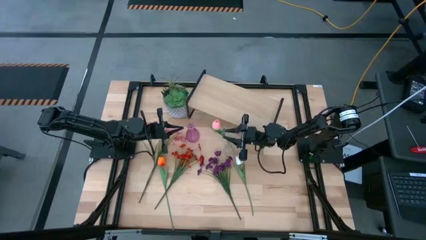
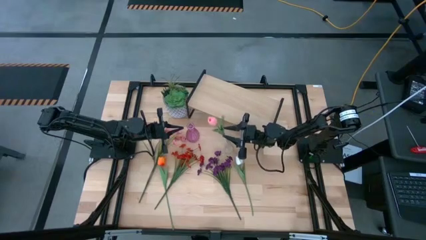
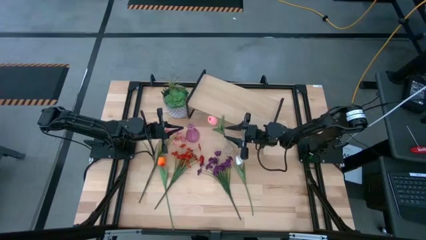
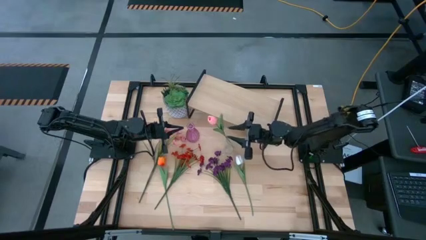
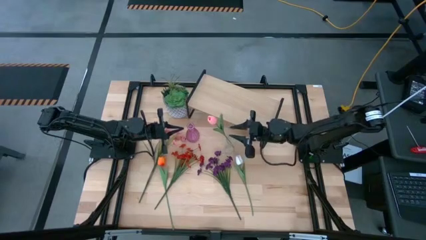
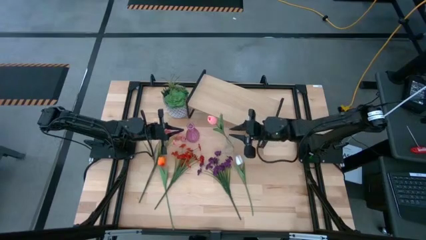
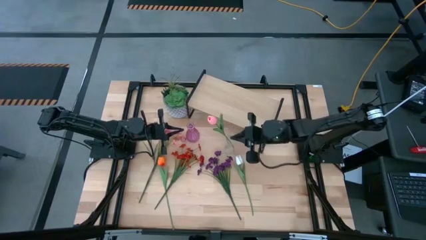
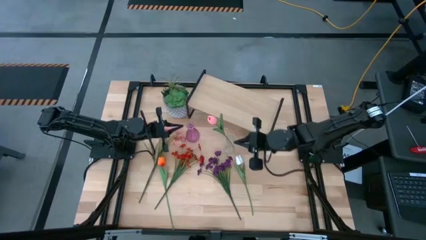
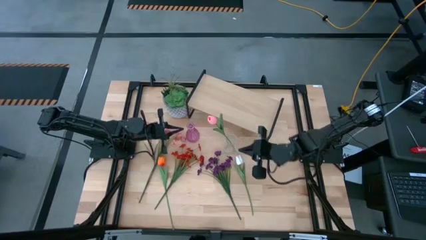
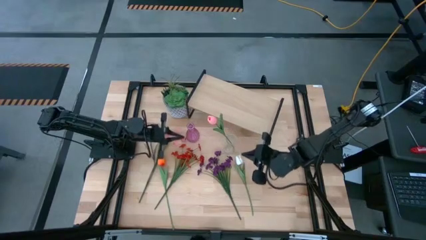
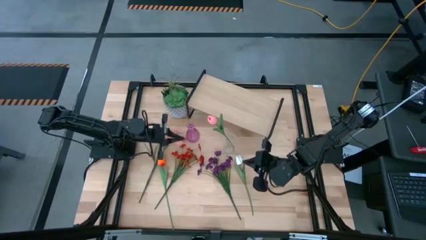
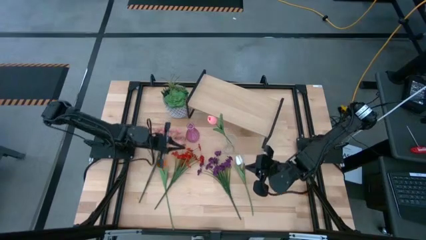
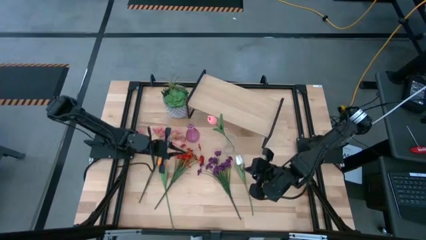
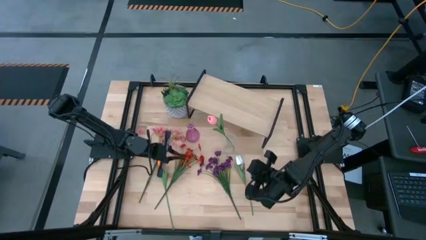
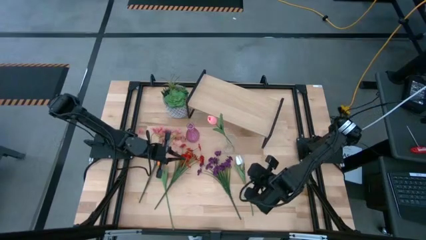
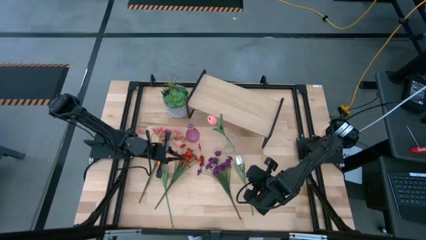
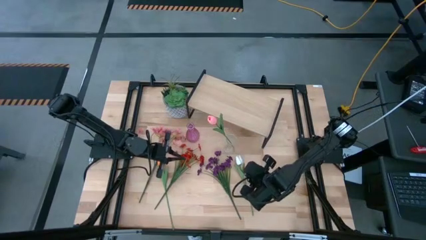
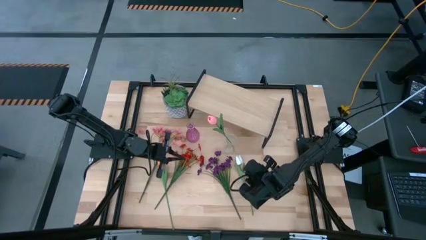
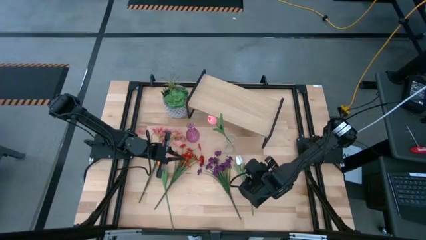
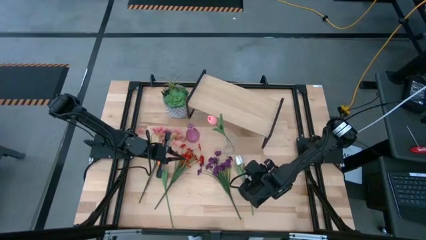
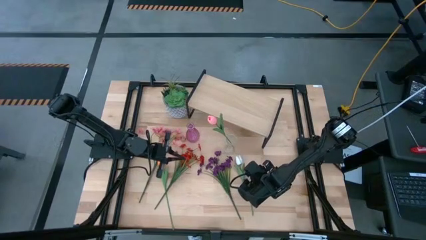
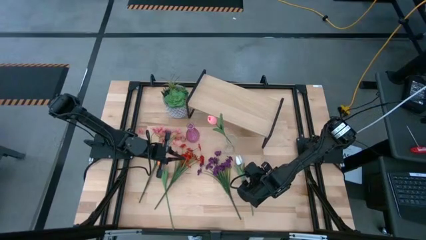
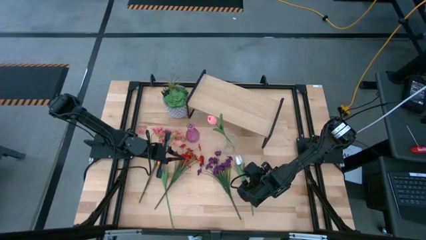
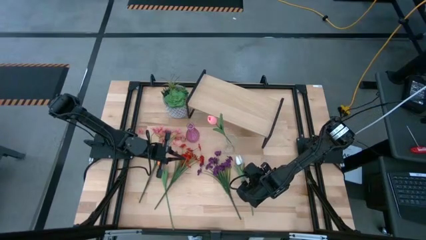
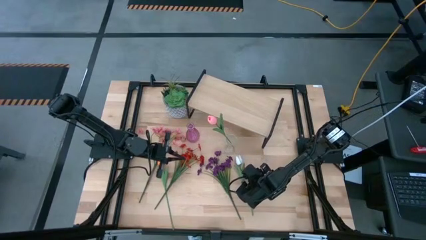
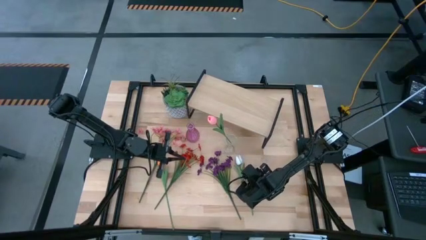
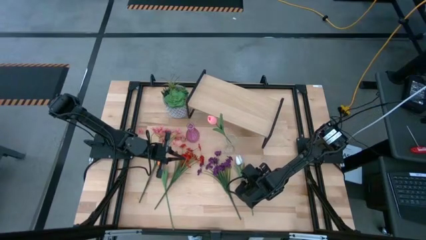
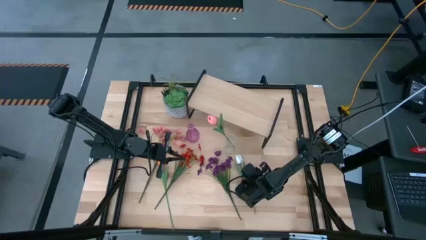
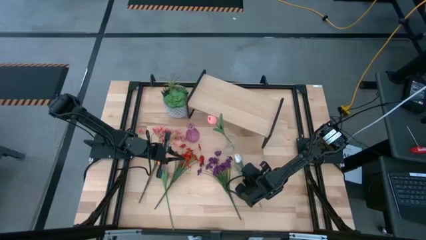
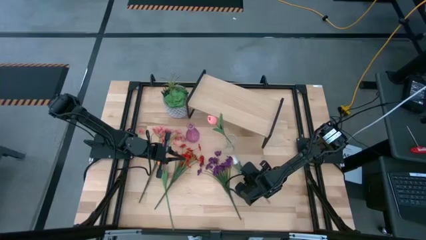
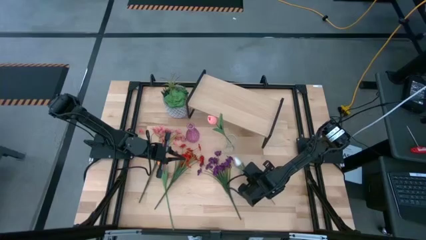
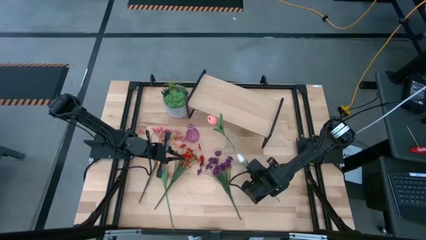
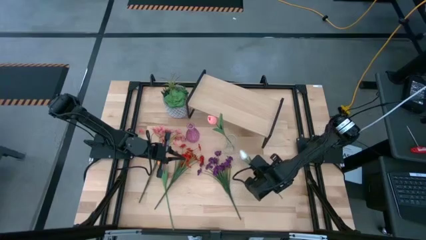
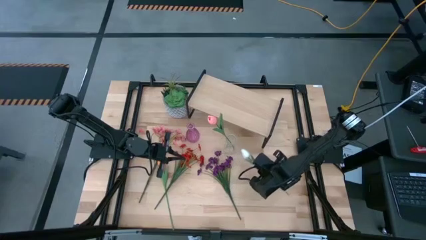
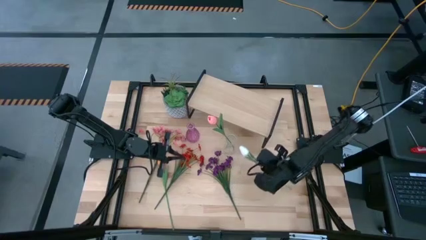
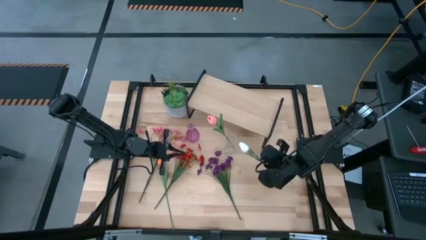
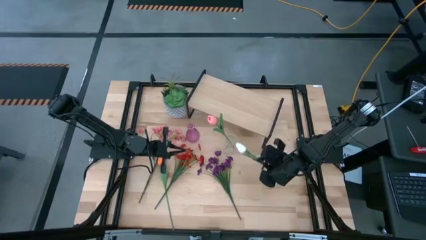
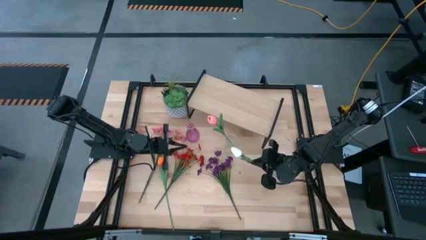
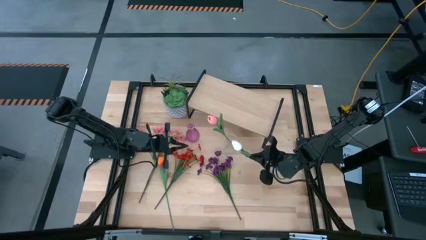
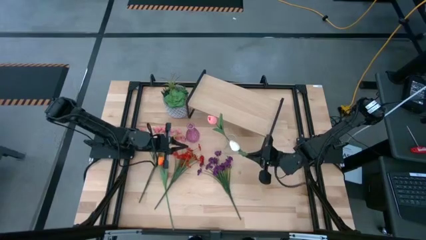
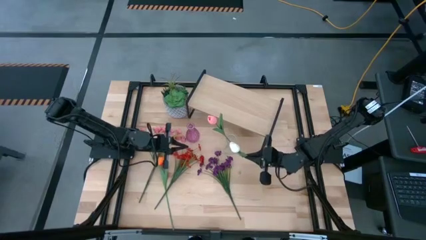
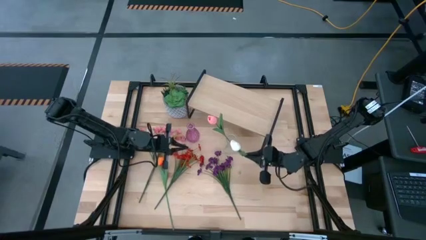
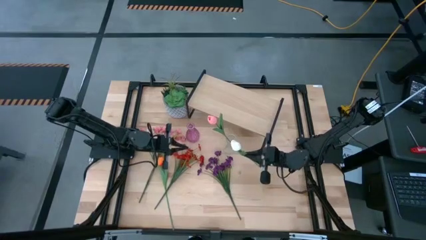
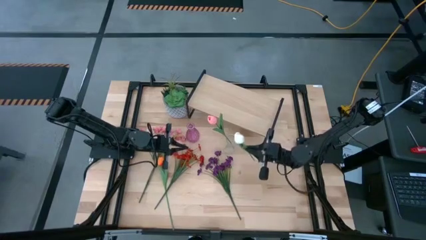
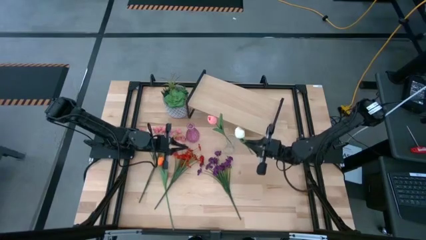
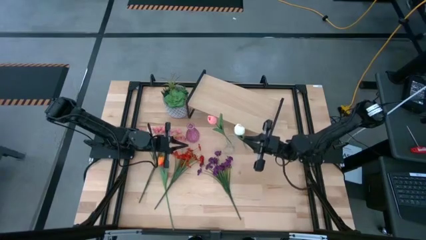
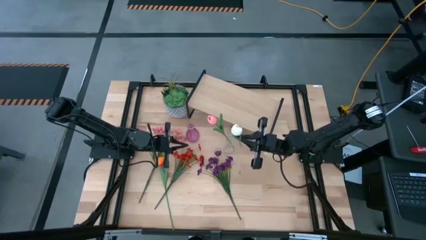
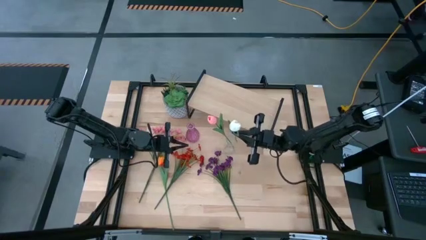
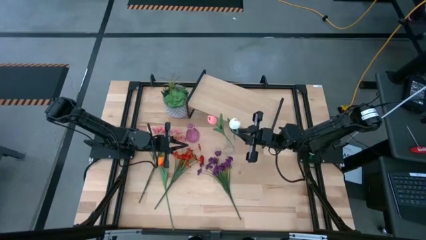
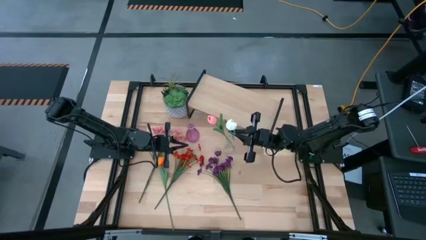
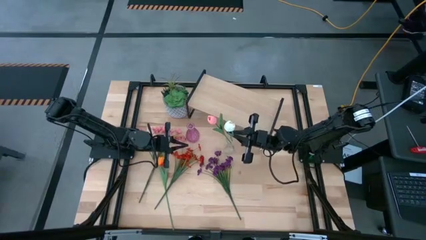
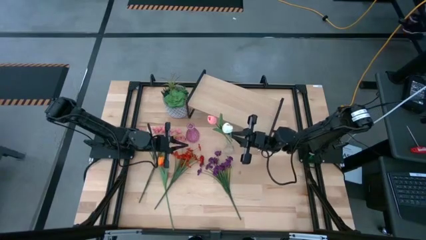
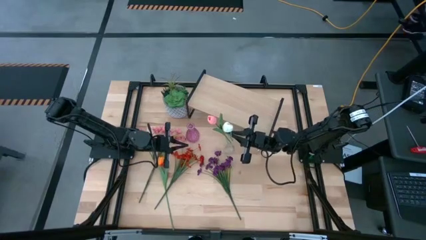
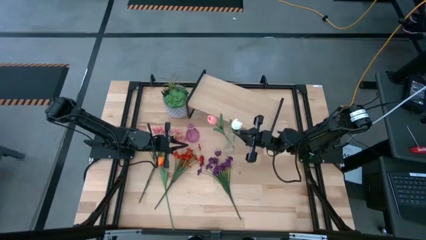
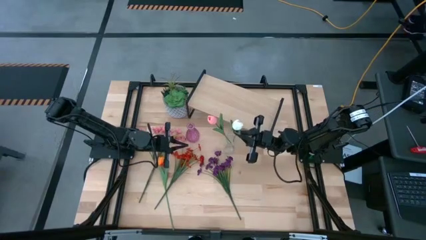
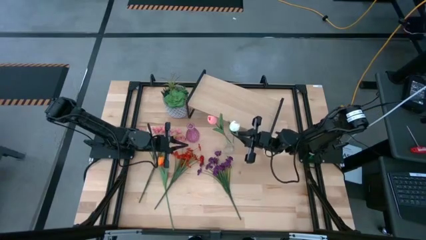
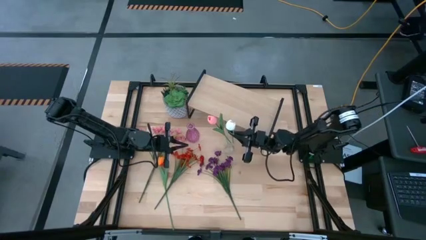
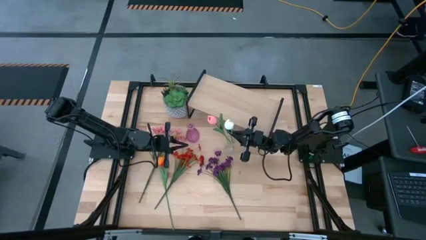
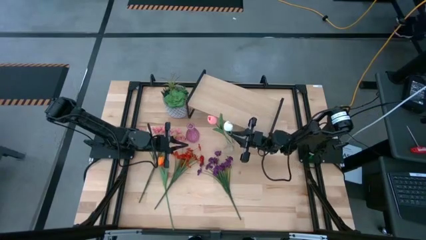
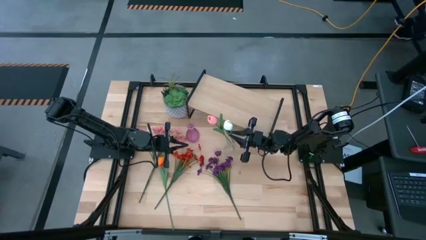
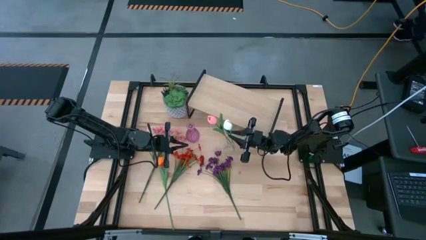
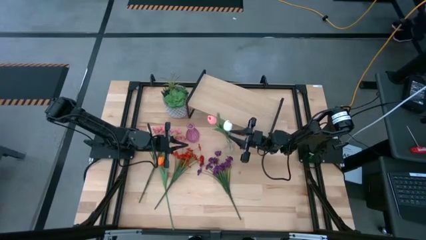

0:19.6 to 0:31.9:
Task: Pick and place flowers into a vace then onto a shelf
Put the white flower into the transparent vase

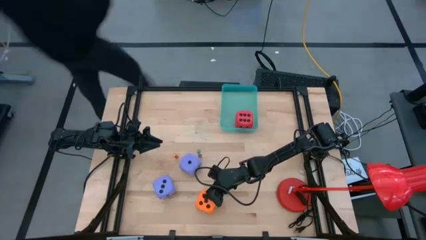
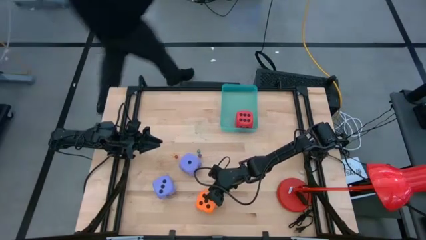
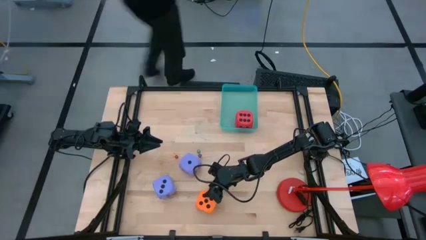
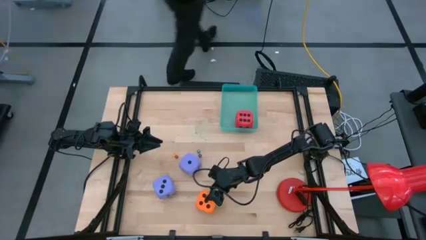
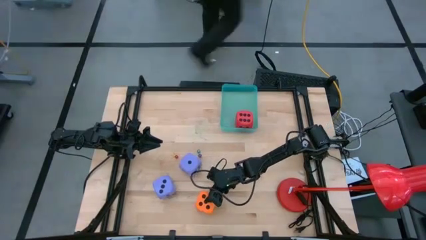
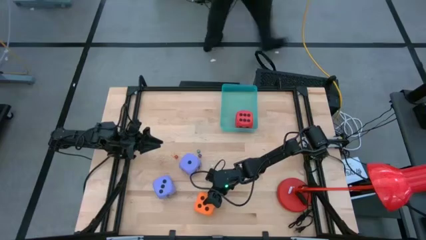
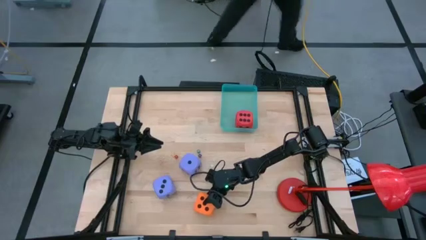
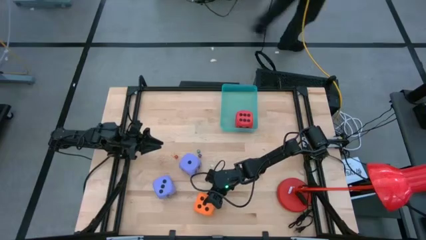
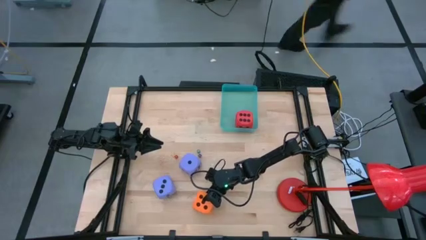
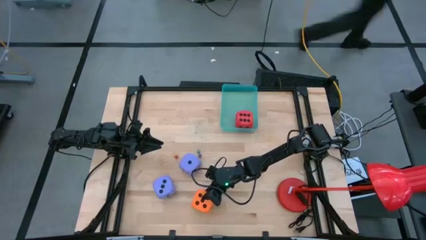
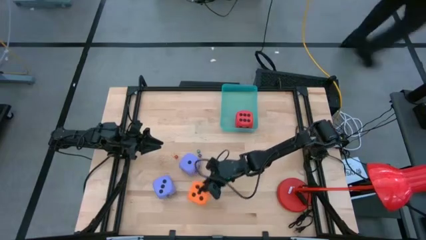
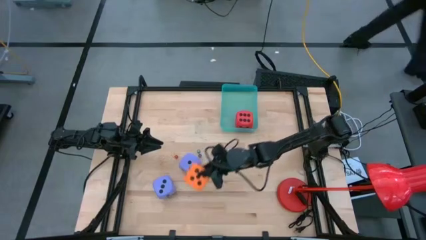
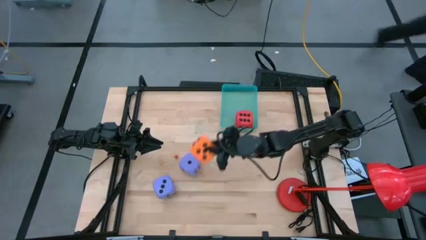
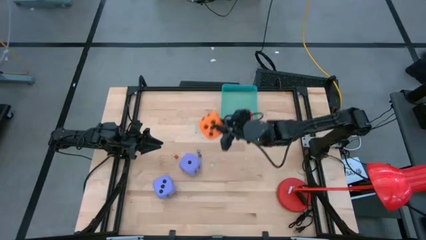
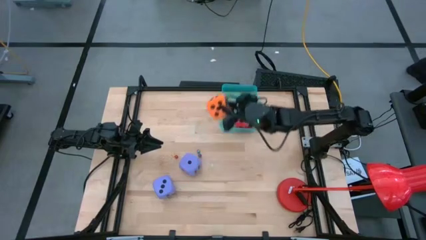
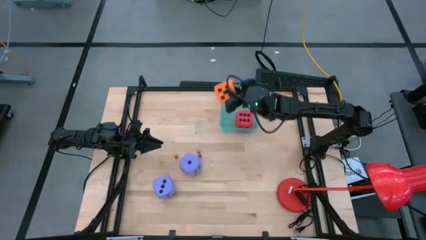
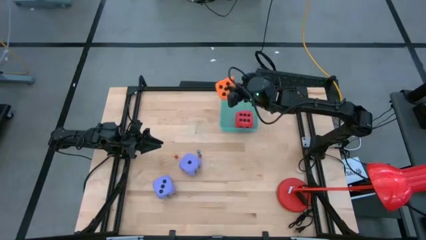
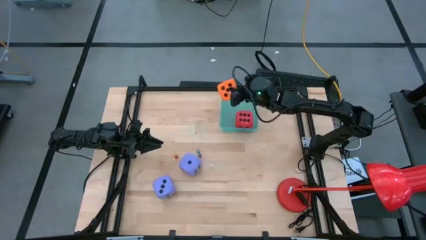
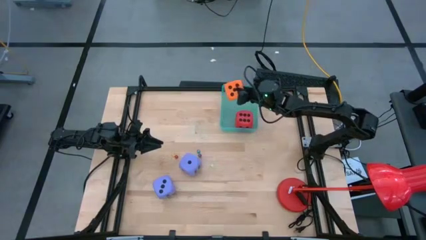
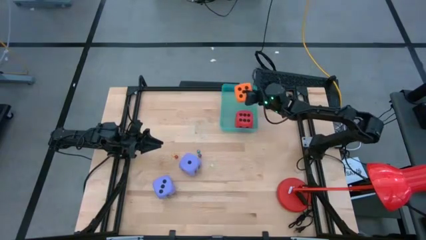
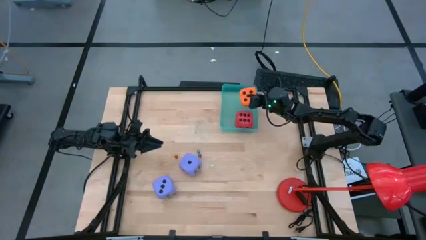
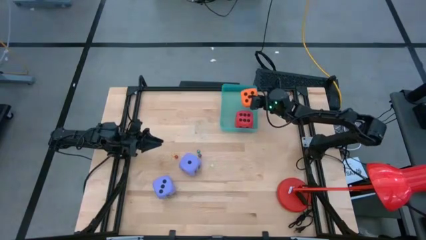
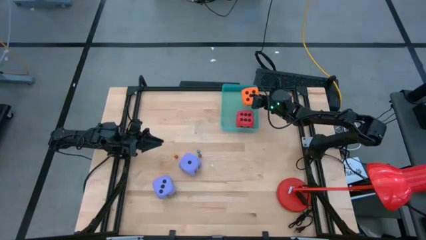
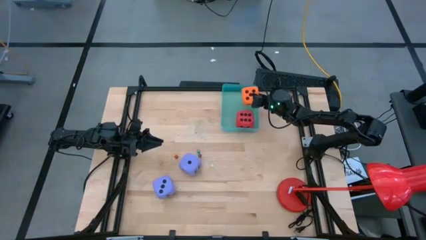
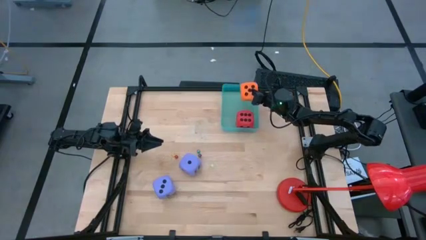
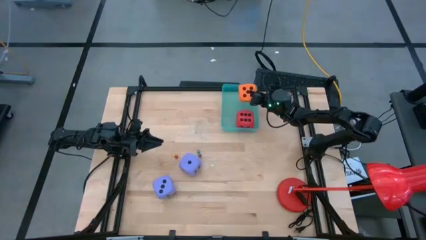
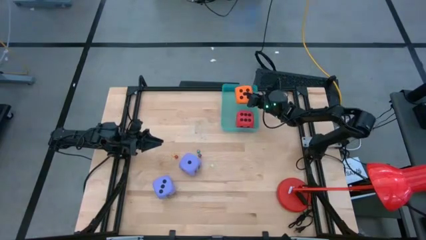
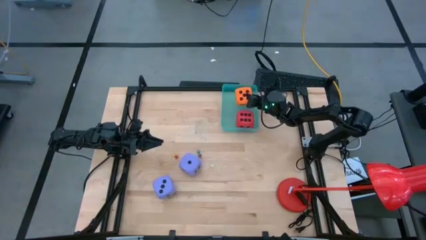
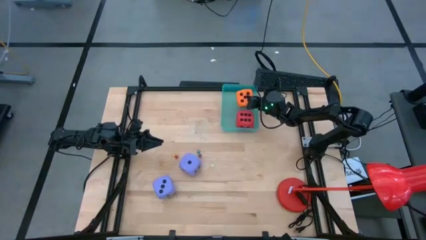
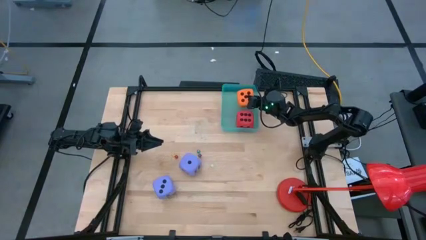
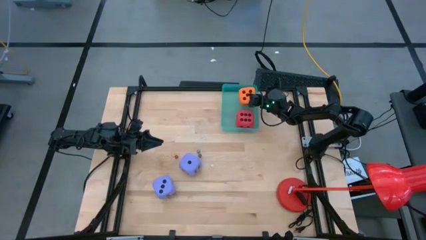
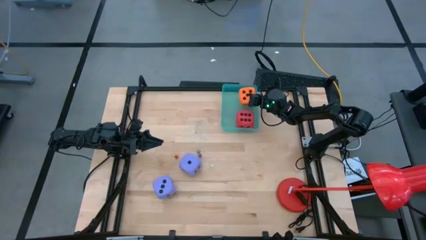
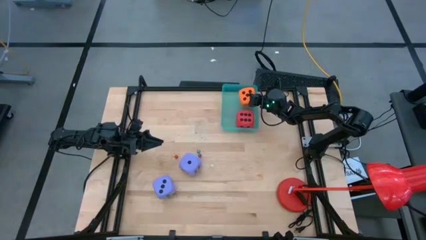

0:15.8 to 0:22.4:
Task: Pick & Place Dice
Put the orange die into the green bin
